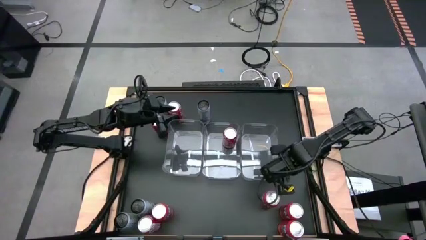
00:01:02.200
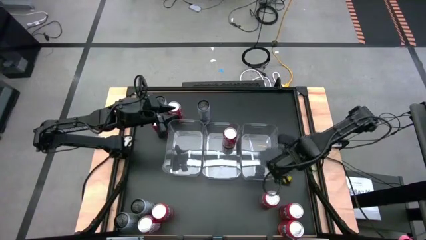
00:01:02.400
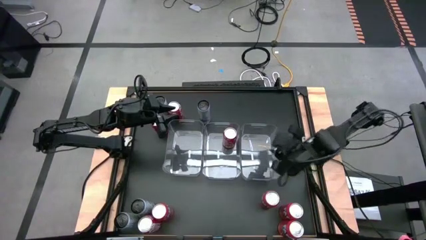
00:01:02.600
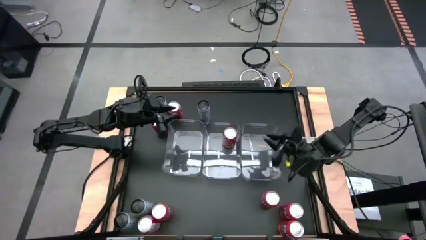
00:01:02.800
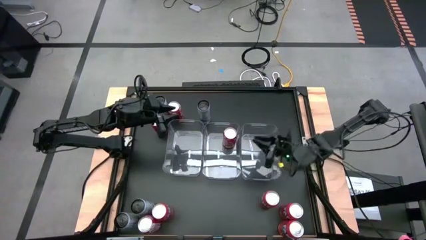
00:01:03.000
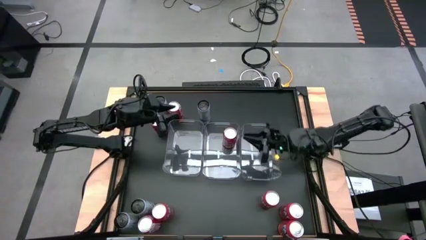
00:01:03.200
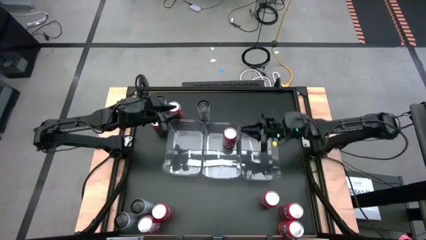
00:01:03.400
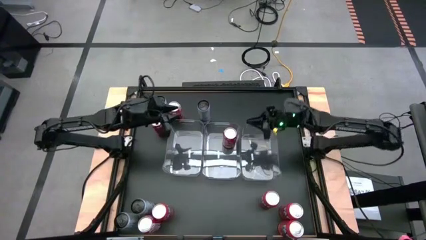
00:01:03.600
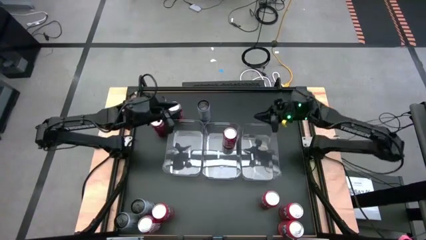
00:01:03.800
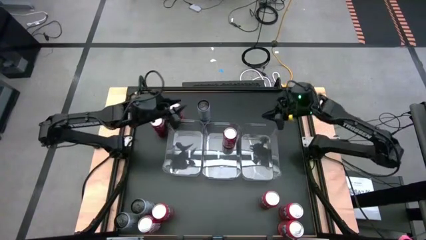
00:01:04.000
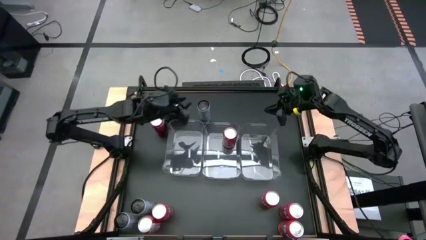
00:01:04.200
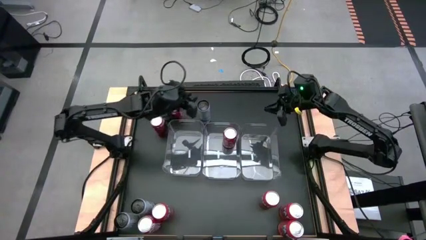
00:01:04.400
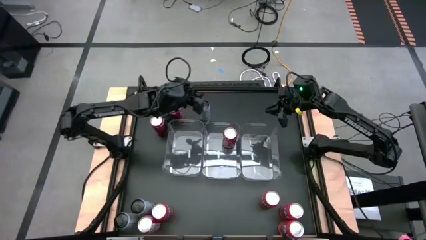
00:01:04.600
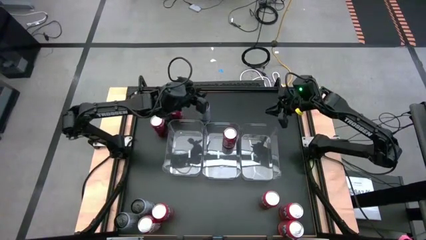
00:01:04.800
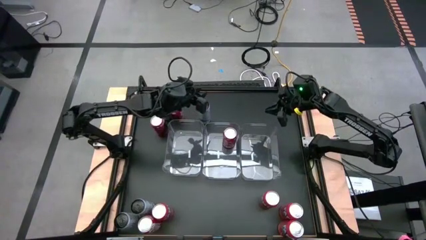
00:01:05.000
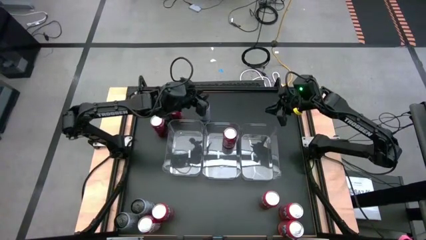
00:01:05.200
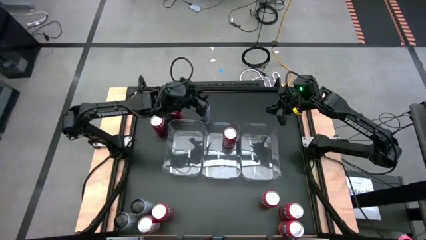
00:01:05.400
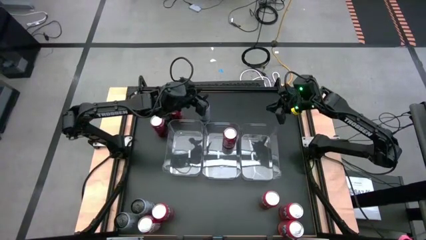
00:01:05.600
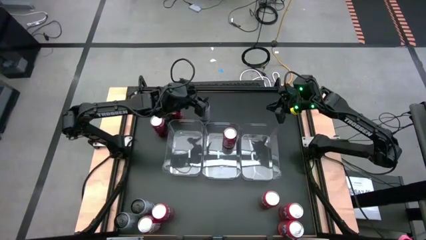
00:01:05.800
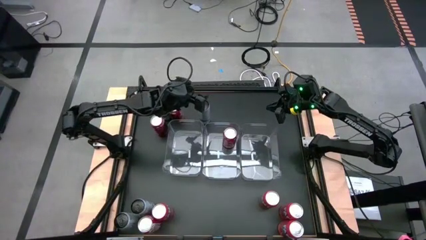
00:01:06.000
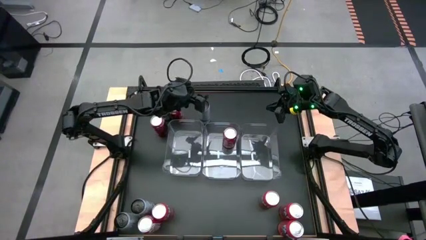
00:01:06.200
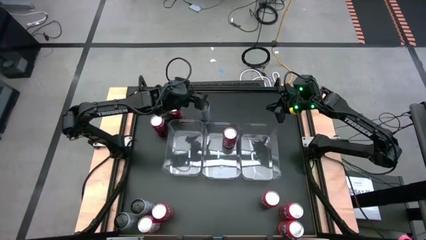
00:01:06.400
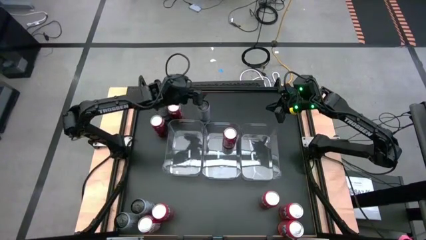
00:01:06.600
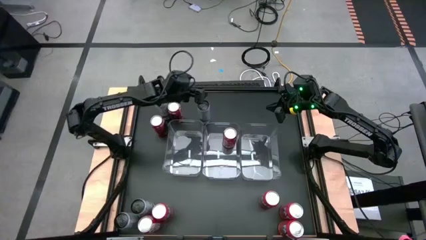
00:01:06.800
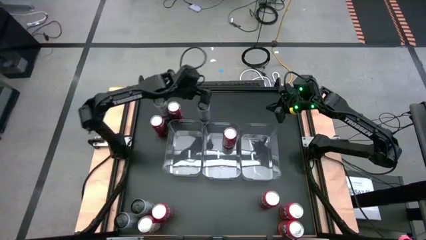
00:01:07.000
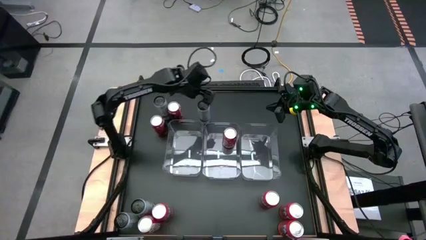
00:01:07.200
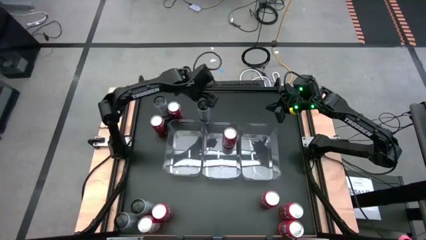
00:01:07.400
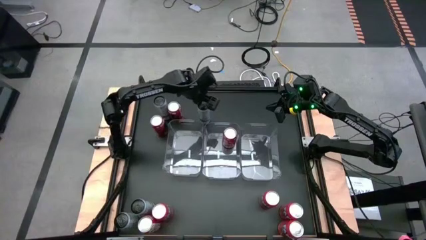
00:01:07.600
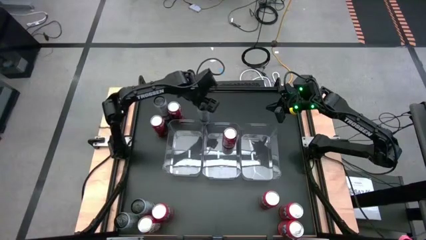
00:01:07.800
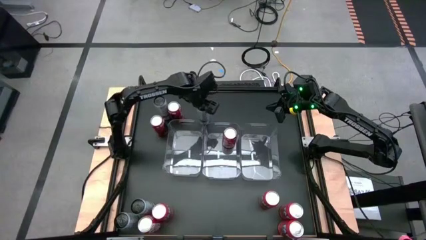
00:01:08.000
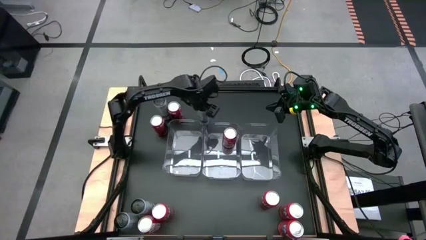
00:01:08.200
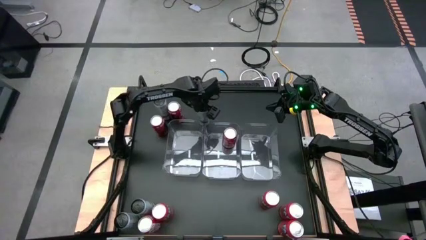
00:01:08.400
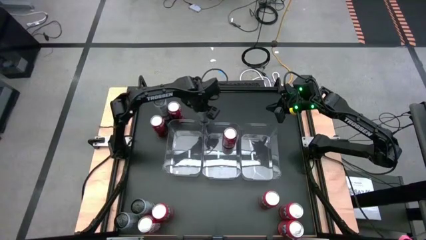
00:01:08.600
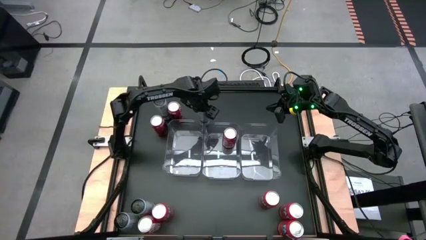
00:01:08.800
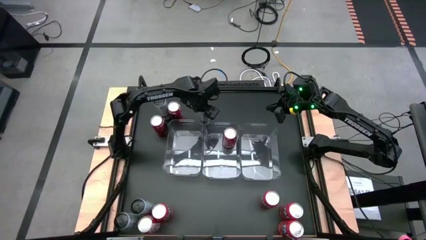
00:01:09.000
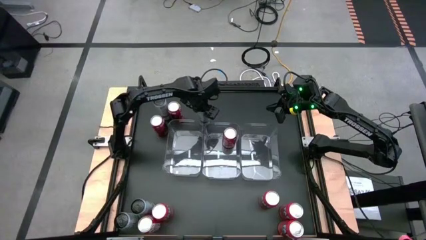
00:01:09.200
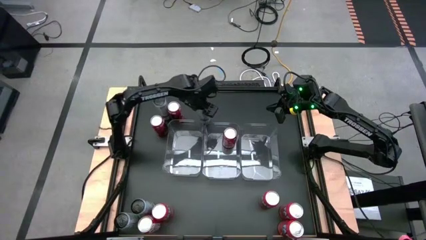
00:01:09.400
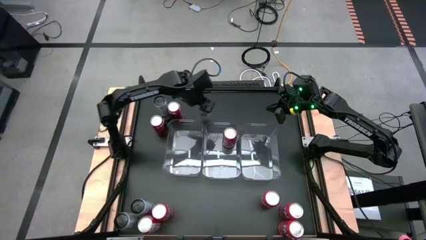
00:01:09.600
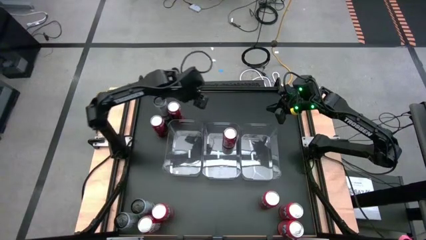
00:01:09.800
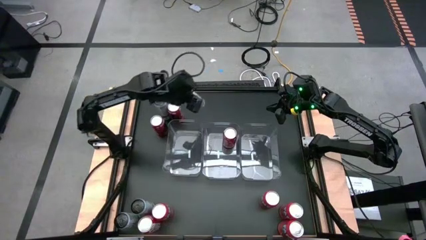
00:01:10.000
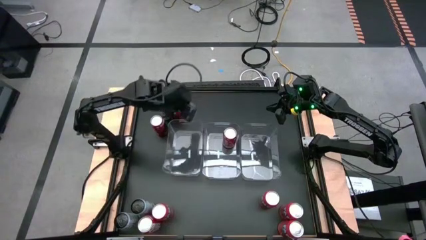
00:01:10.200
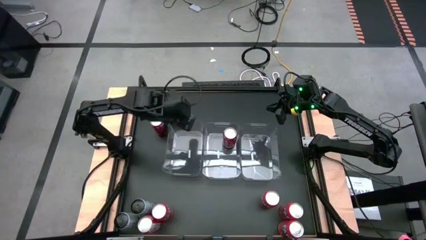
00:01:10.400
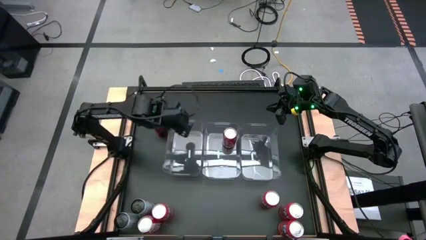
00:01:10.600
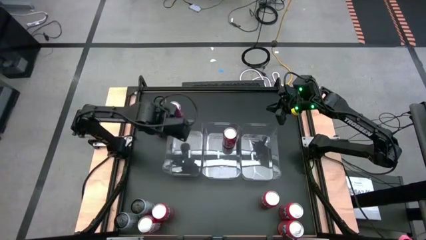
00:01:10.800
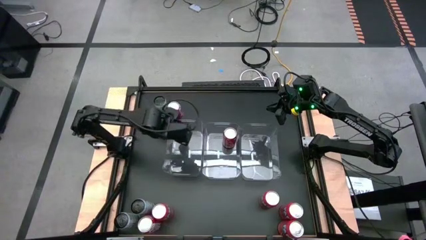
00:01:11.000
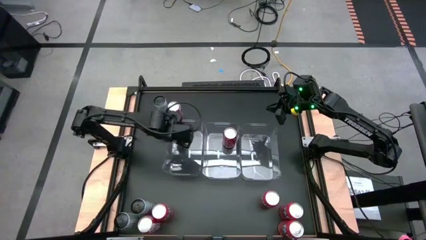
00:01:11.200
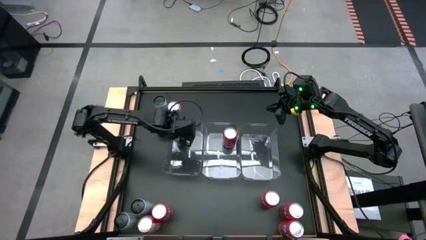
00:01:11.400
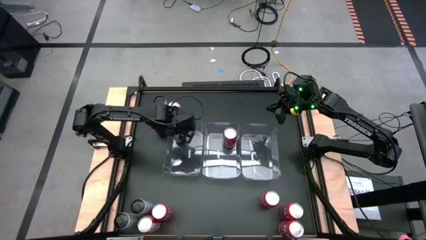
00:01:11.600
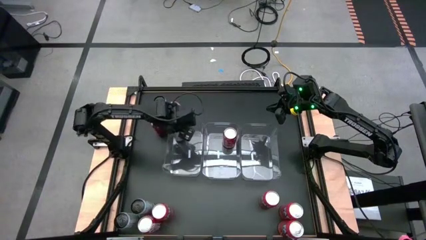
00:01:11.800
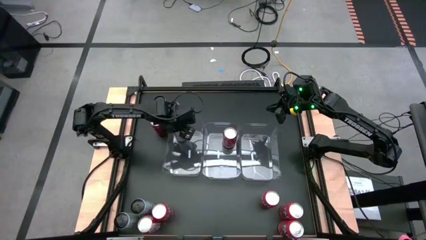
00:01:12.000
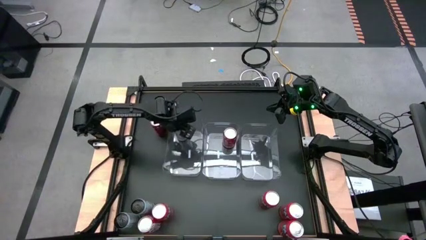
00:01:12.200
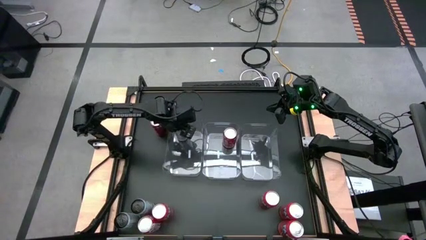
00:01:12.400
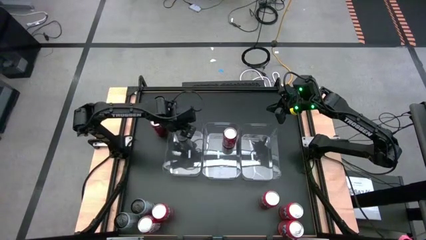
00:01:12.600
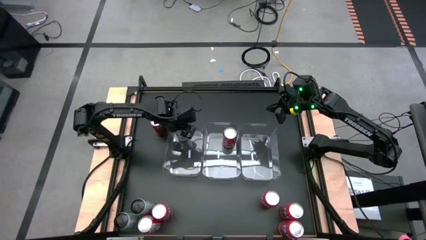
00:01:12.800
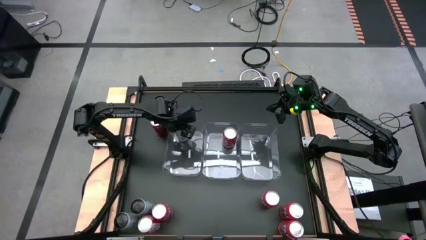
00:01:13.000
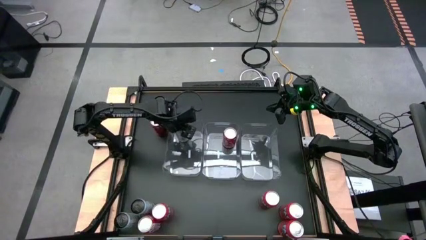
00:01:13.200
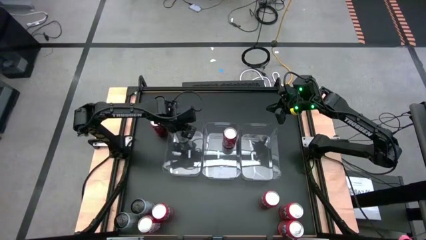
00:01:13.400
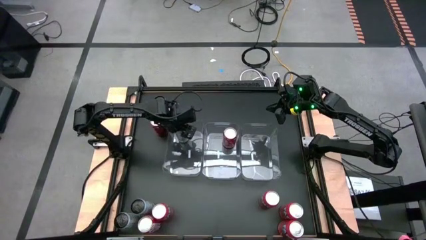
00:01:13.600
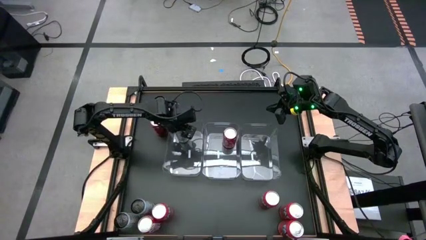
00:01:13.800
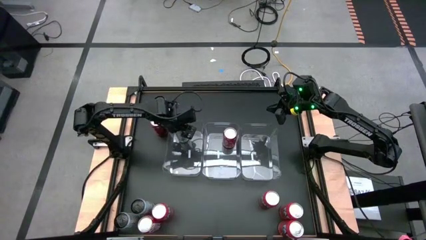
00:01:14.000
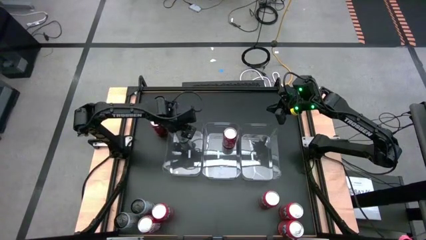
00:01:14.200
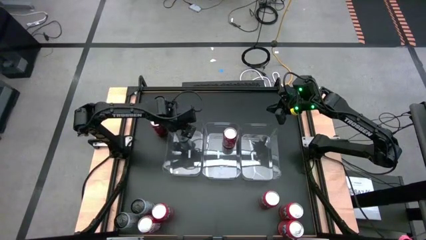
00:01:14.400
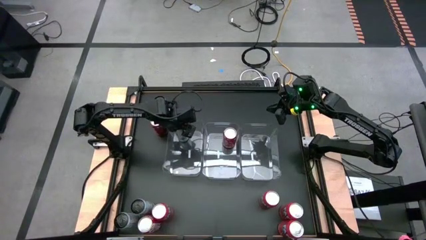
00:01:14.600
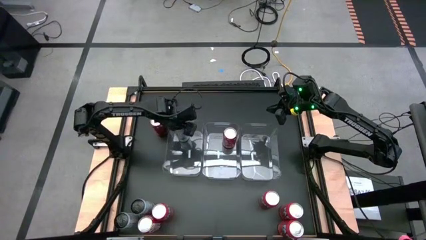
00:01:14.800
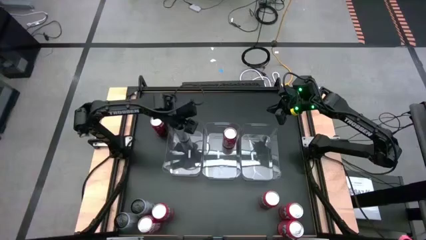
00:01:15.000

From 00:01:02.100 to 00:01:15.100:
Task: Sort soda cans
Put the white-blue soda can into the left transparent bin
